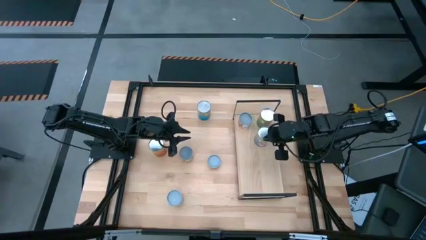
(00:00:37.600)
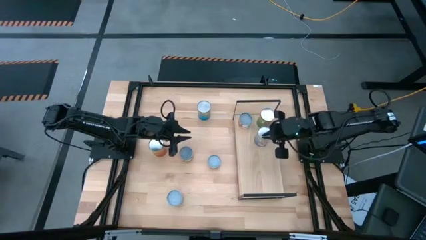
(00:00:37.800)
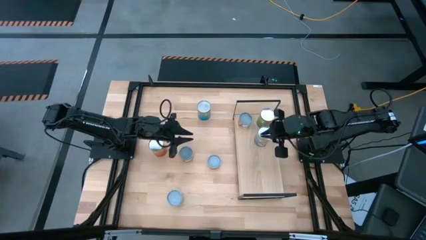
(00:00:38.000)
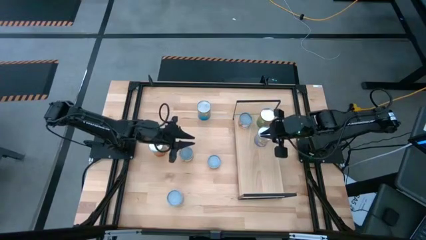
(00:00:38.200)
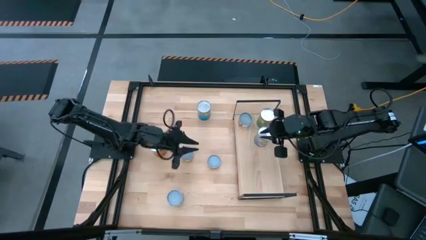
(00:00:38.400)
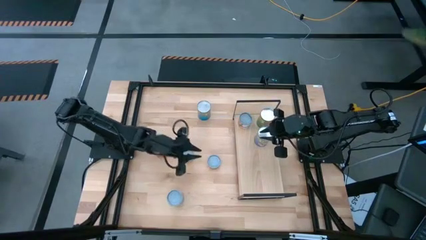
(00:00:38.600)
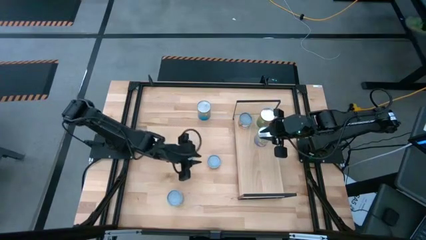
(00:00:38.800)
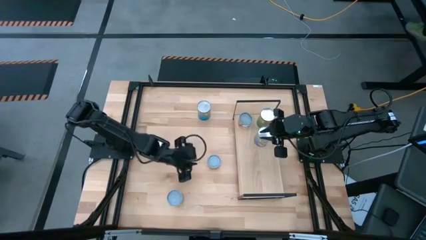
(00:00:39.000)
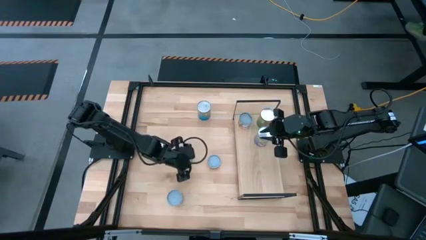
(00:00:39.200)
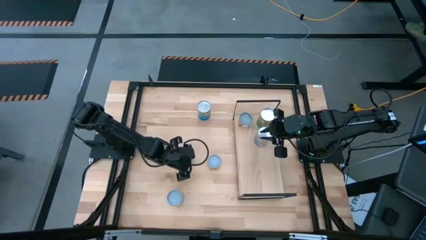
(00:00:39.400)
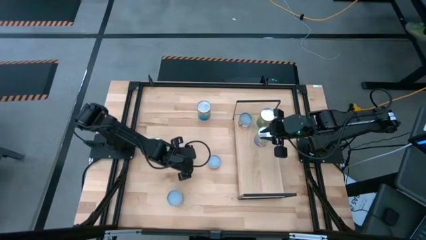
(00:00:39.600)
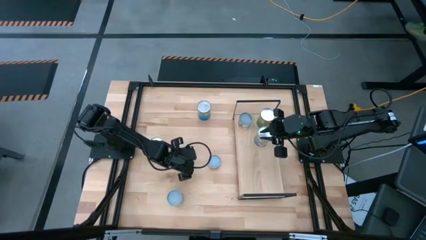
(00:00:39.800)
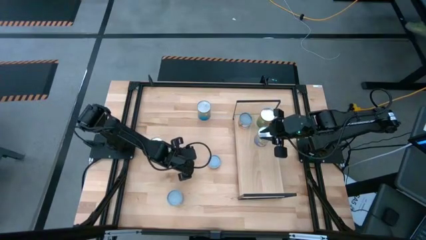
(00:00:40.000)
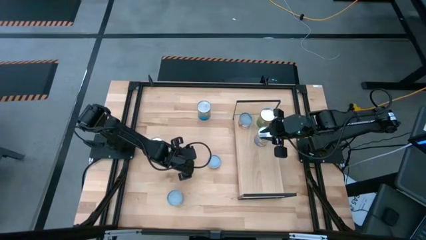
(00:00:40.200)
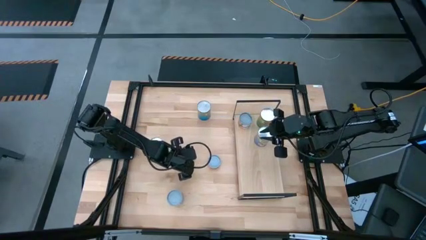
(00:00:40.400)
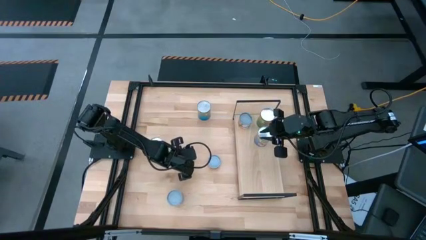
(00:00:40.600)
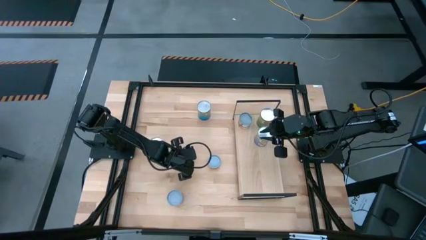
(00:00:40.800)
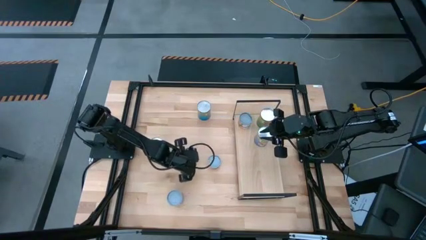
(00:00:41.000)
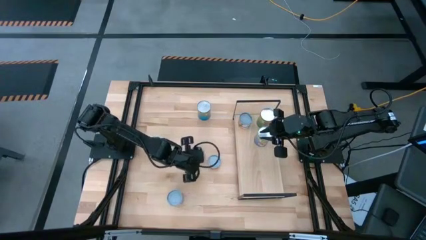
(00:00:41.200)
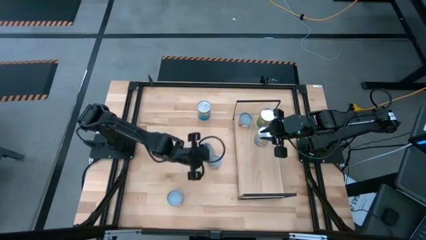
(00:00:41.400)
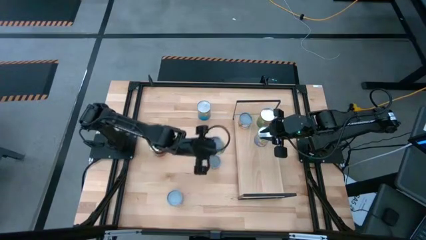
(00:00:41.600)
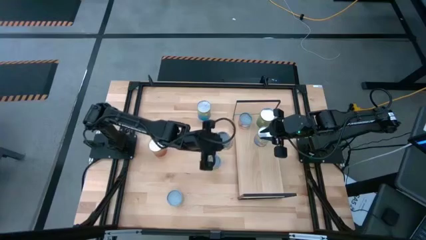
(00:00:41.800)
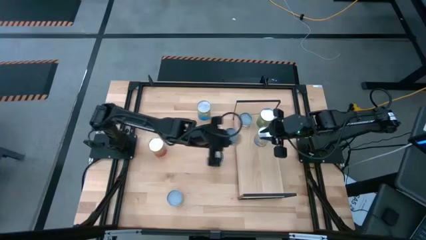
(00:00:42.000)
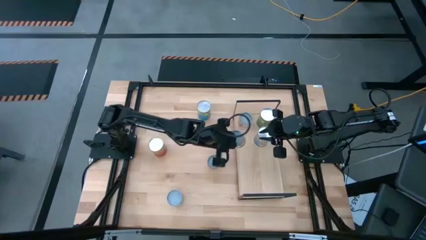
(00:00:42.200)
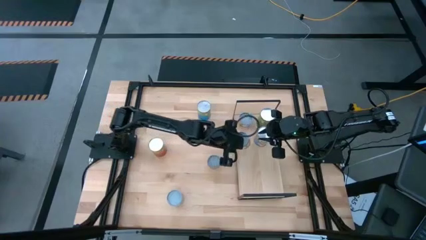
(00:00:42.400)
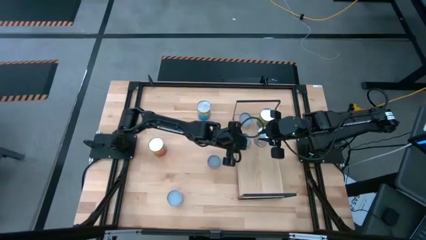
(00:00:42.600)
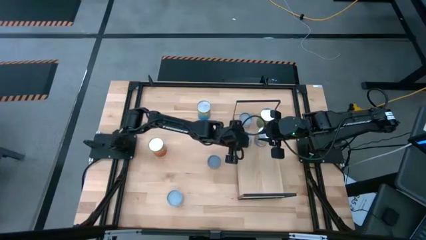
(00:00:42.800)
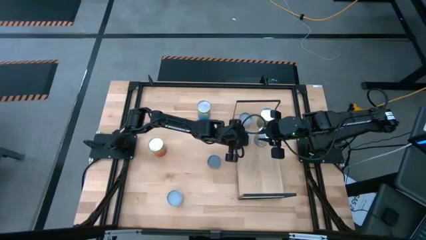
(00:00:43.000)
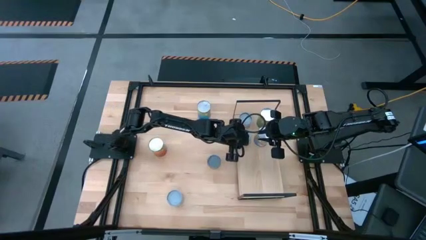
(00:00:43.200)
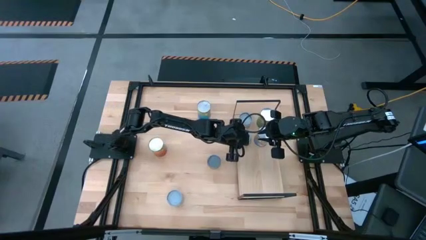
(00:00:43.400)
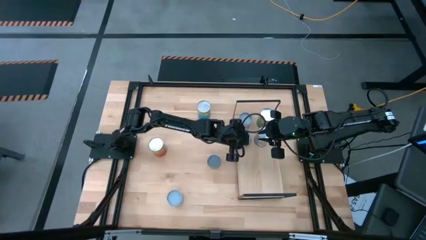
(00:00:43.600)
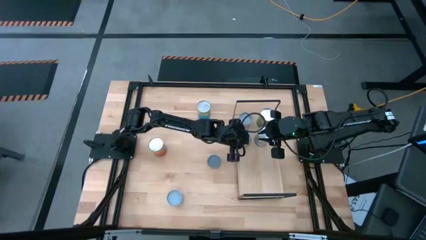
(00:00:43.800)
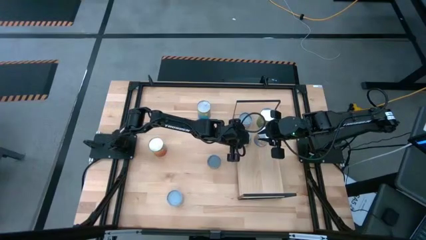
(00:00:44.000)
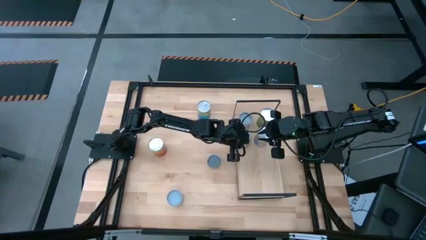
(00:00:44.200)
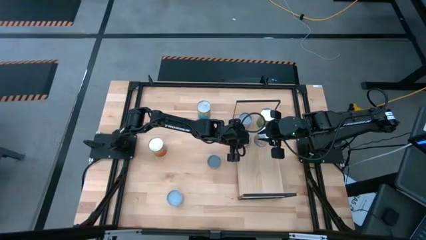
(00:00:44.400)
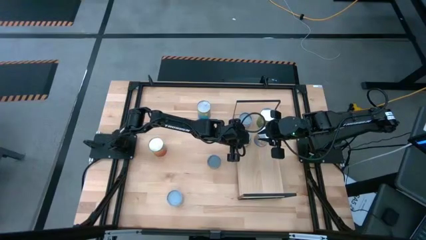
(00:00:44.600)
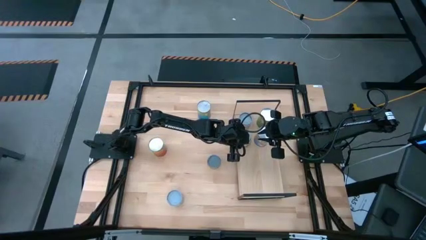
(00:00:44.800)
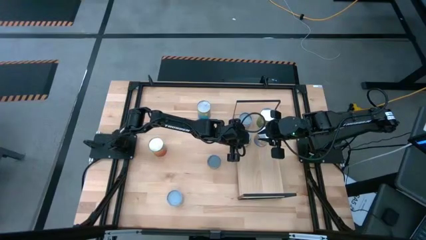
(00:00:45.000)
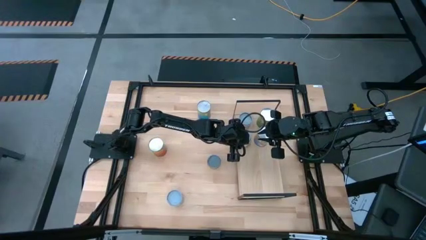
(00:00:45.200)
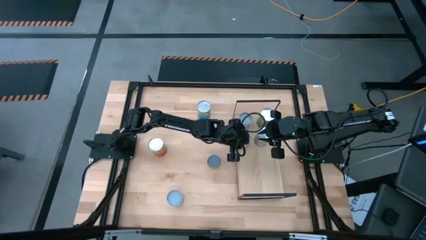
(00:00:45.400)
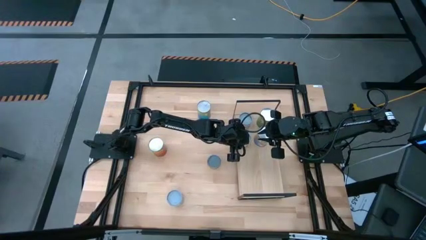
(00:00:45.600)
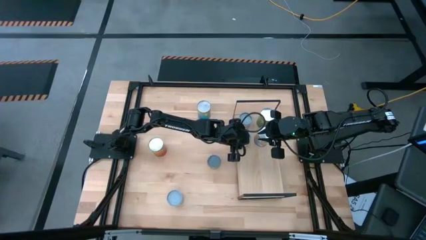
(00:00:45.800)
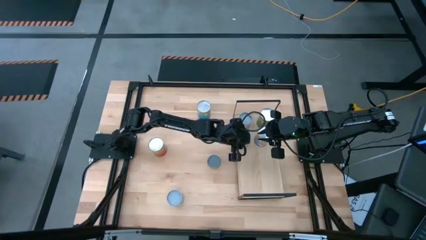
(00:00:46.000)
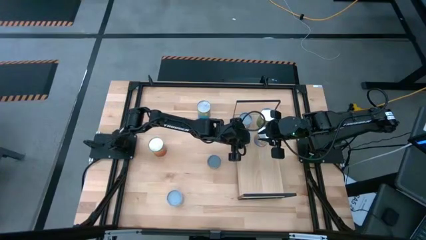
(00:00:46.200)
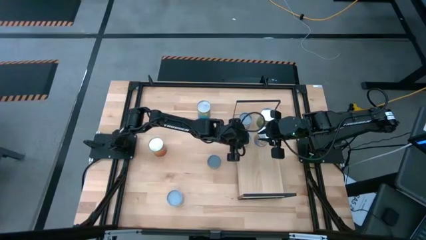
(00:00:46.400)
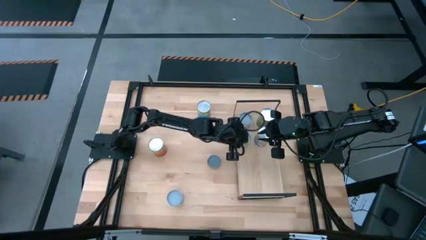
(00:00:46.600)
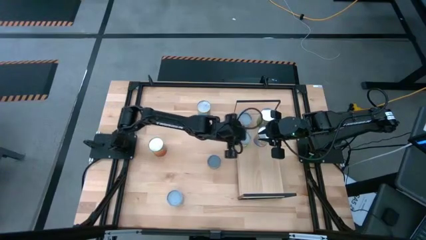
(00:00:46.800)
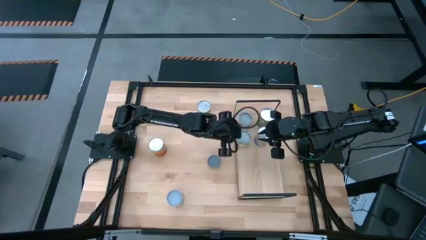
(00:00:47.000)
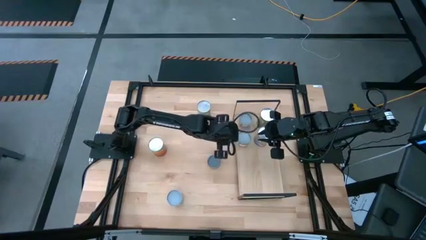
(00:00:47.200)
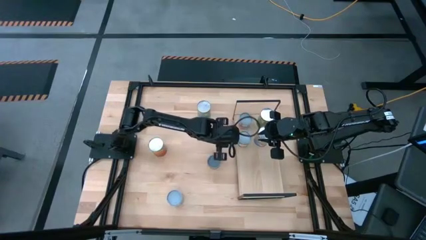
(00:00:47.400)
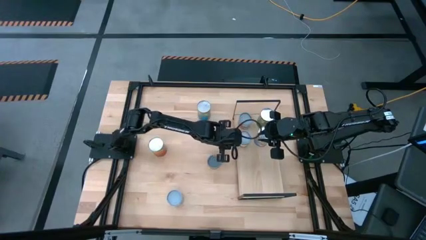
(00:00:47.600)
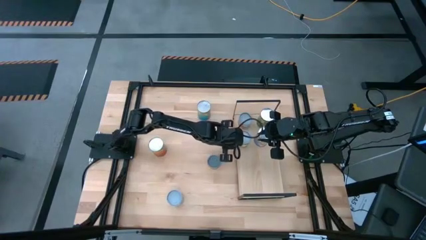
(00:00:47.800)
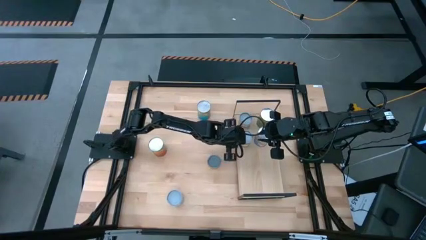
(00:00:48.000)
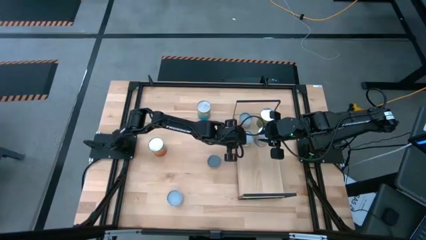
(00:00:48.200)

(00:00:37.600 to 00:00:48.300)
Task: Pick and place cans onto a shelf
Put the canned sliced peaches on the shelf
